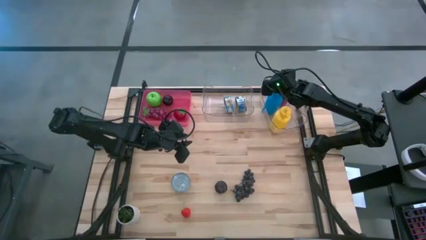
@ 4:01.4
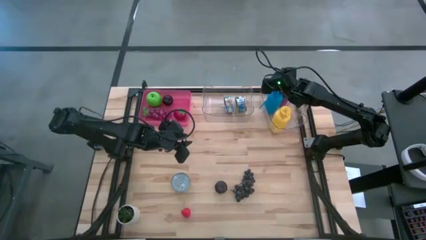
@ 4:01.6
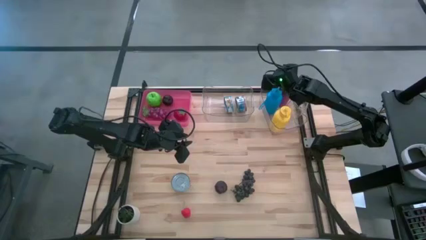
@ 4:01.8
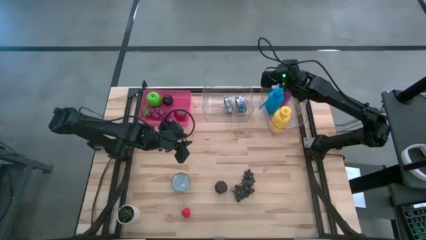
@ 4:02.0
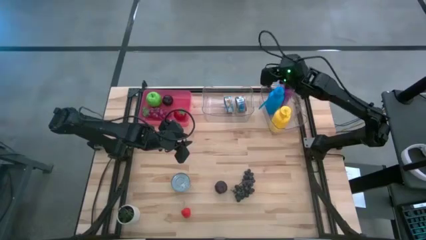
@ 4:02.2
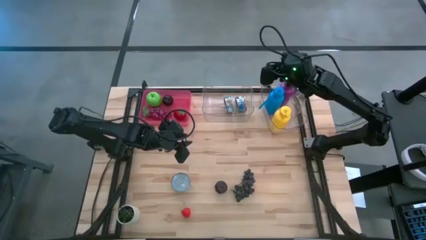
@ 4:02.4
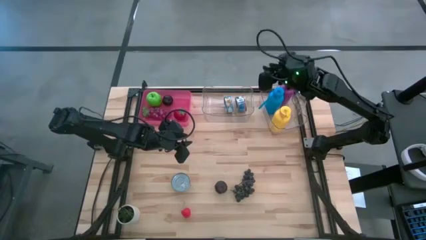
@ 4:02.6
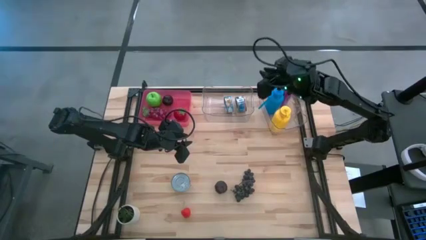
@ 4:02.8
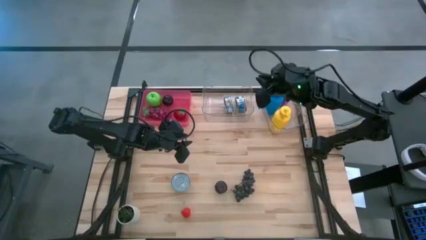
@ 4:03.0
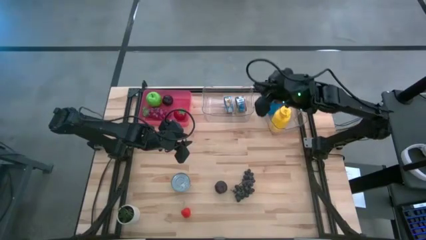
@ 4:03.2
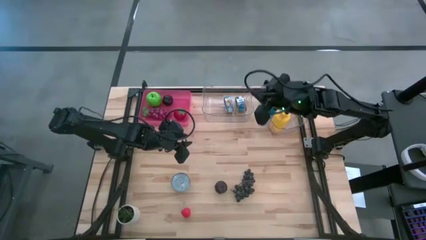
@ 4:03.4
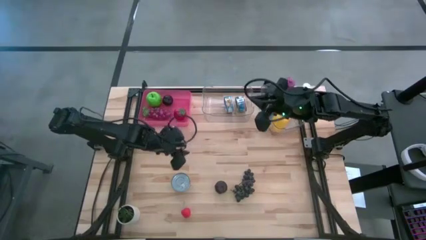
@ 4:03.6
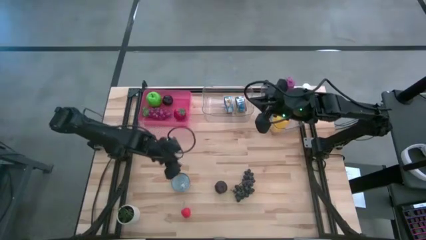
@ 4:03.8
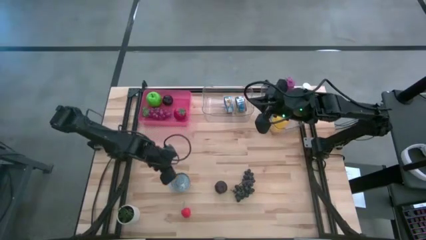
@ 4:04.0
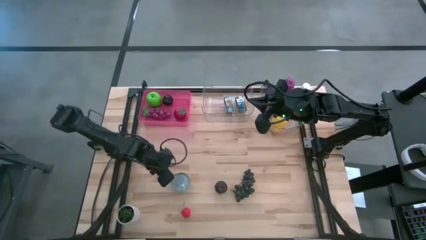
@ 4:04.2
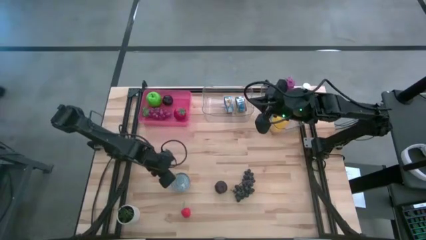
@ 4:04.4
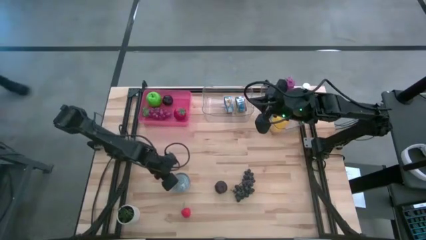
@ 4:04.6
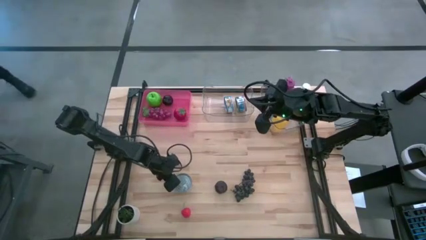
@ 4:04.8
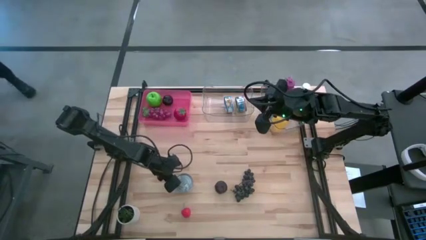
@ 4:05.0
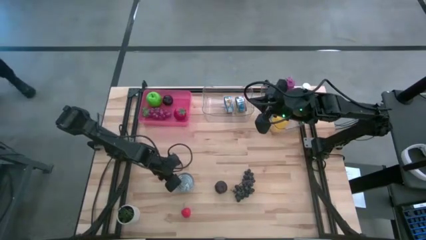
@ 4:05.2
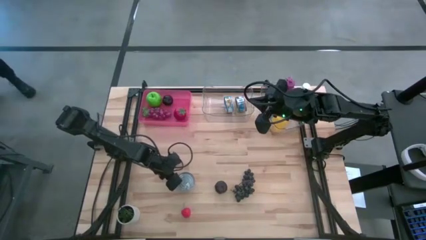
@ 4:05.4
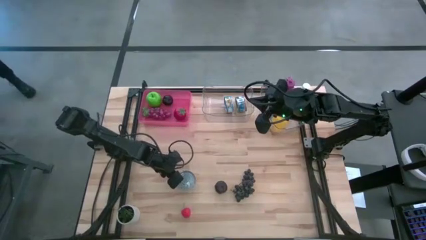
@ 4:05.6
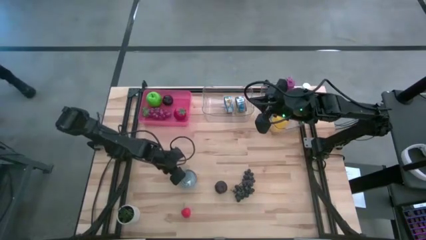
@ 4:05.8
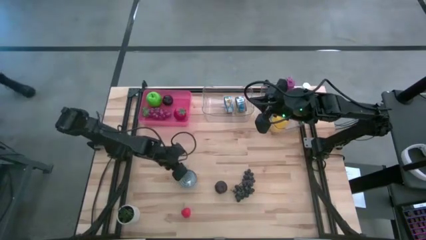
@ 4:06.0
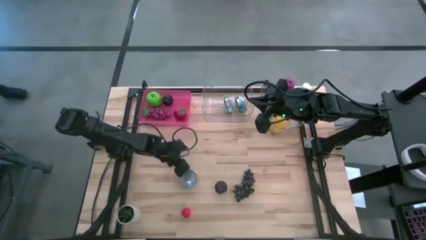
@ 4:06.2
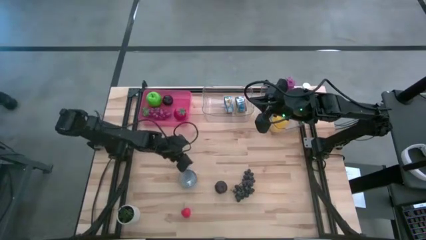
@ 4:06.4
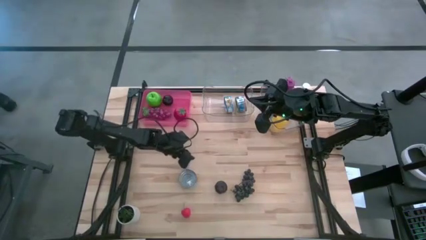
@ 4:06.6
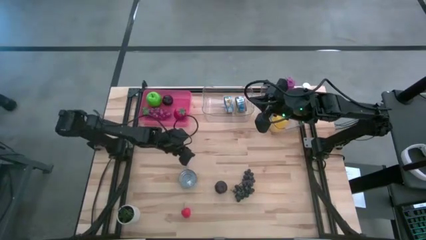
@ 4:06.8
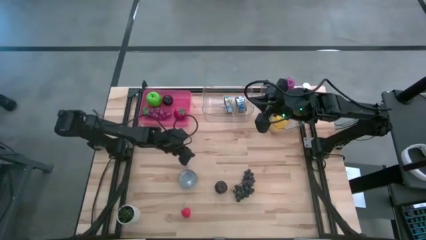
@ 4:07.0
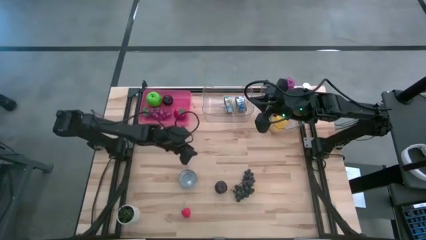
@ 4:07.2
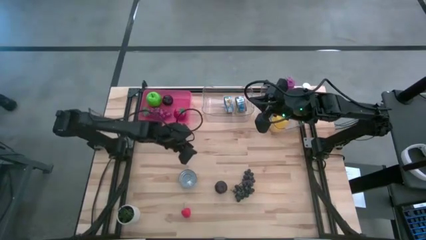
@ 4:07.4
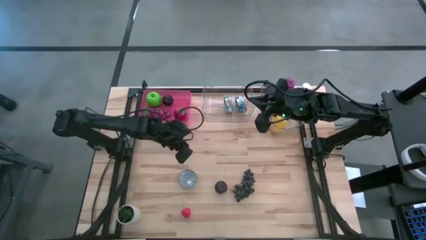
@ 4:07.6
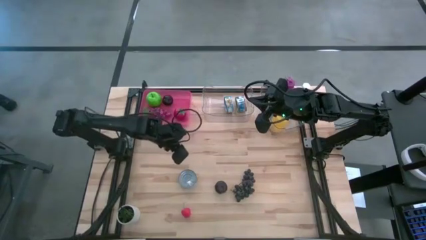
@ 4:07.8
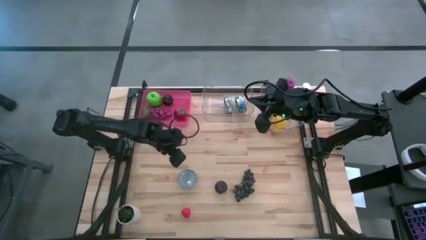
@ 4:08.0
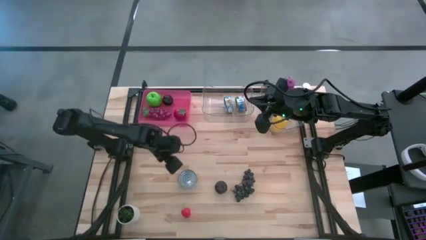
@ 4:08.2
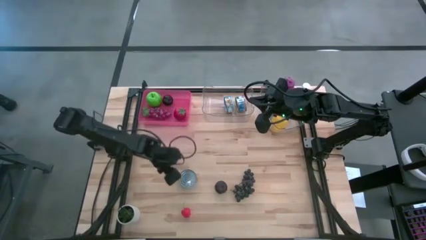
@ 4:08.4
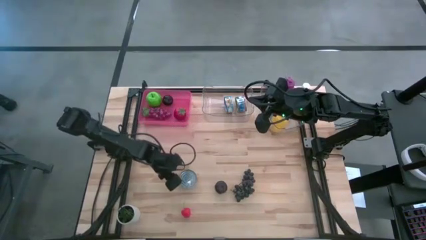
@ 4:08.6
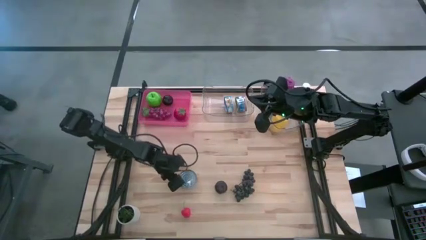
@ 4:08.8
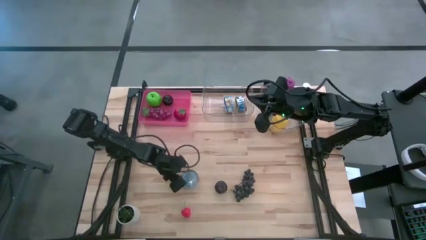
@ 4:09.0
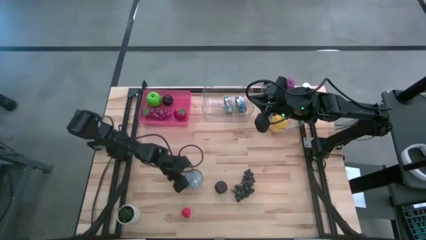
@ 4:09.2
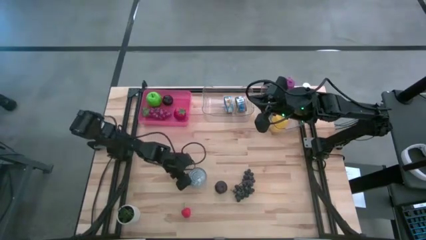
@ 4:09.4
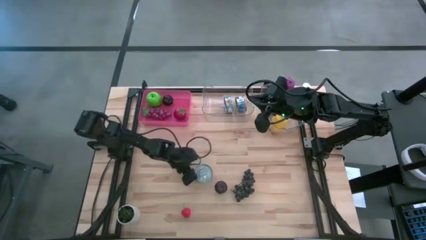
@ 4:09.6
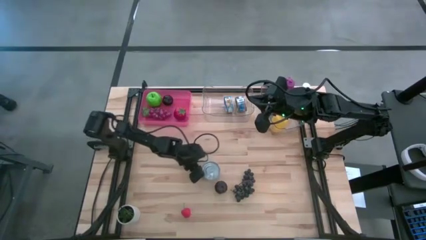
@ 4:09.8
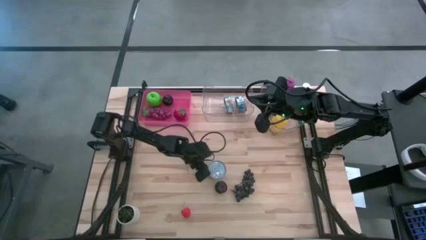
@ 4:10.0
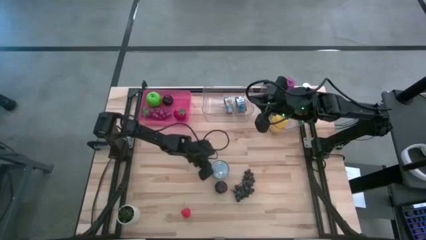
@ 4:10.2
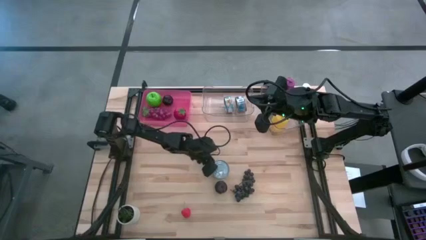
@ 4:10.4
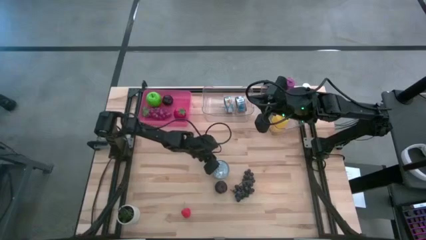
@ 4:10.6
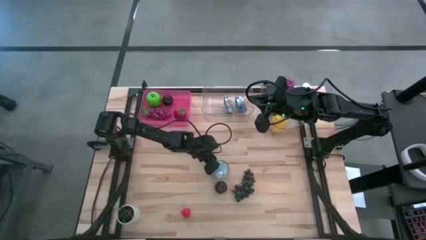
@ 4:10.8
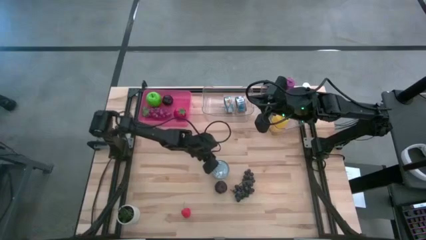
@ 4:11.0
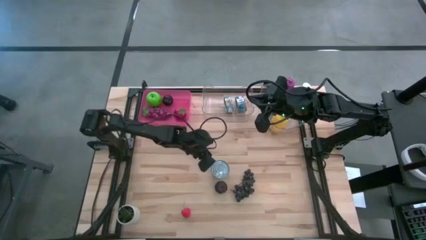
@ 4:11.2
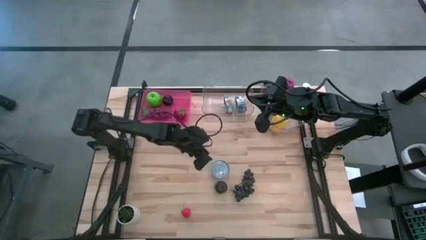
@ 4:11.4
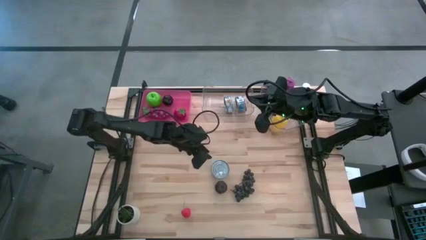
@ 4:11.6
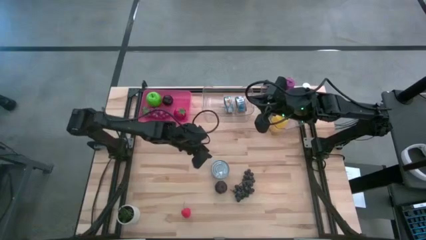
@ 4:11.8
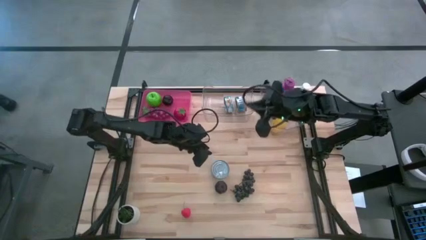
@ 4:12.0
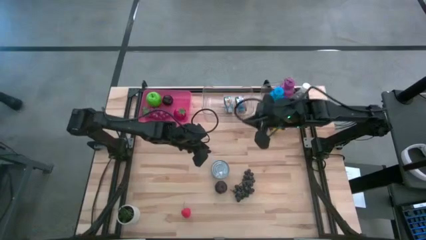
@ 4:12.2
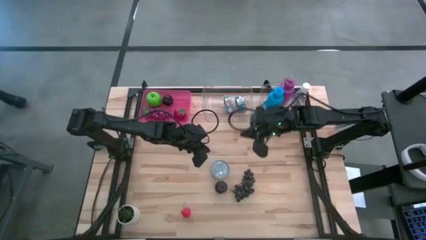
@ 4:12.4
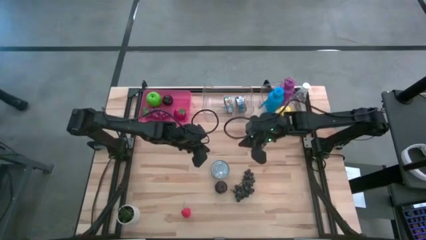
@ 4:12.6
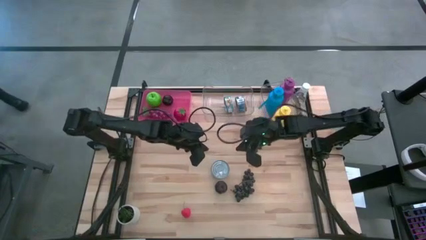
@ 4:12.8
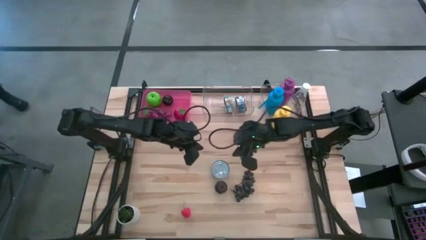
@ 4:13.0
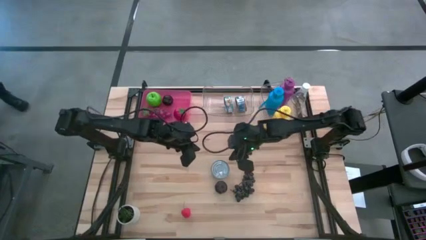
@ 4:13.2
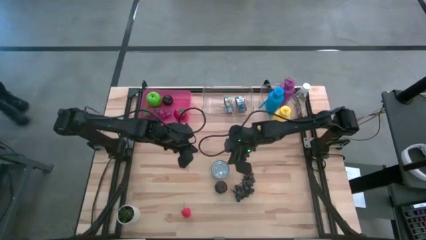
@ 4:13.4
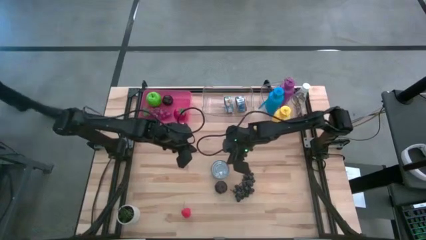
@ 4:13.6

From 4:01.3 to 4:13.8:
Task: Pick & Place Food Item
Put the blue tuna can into the left transparent bin

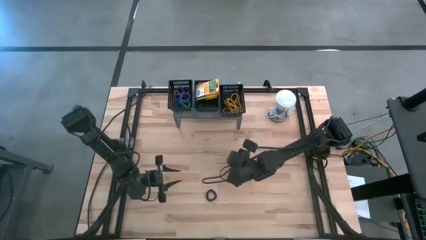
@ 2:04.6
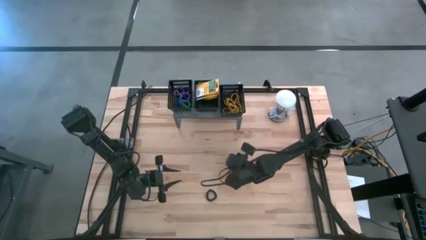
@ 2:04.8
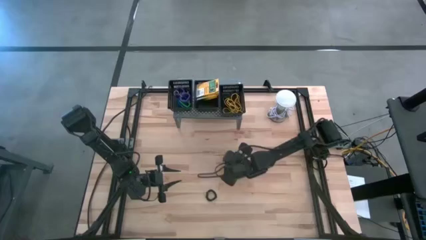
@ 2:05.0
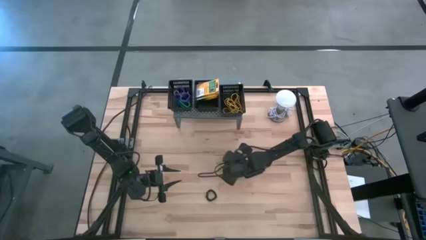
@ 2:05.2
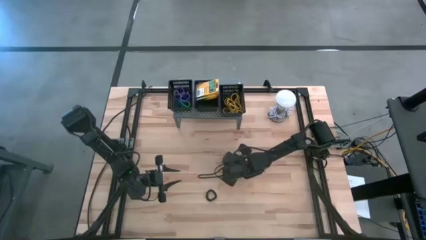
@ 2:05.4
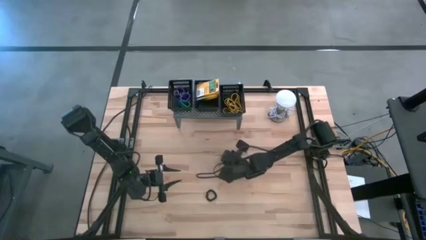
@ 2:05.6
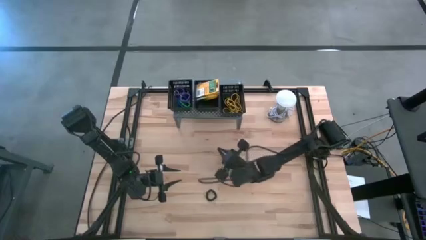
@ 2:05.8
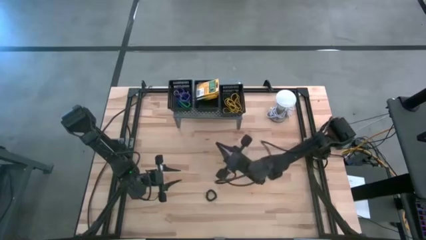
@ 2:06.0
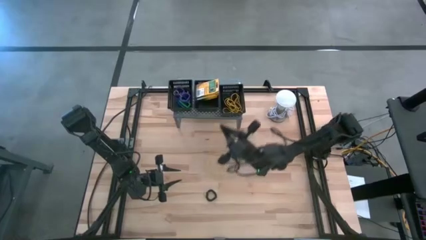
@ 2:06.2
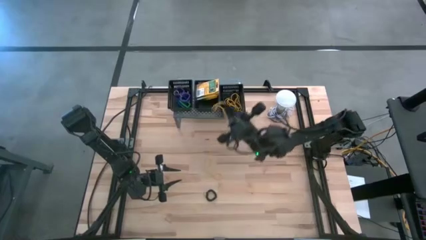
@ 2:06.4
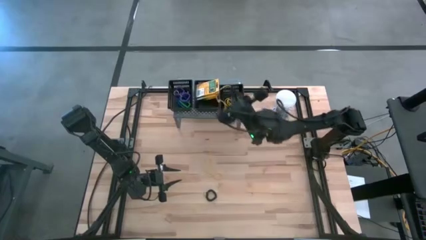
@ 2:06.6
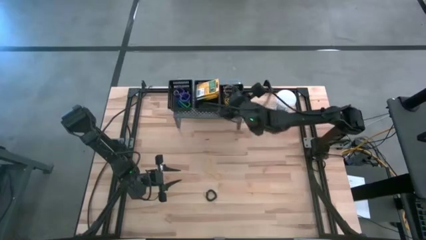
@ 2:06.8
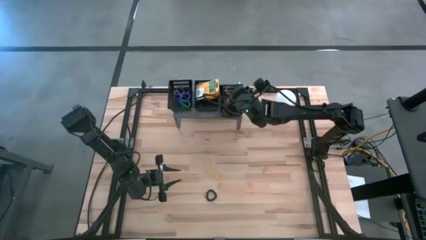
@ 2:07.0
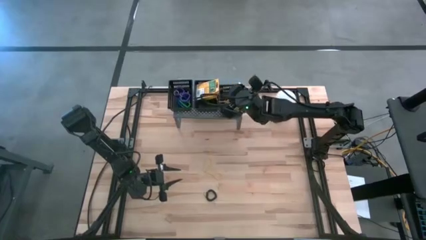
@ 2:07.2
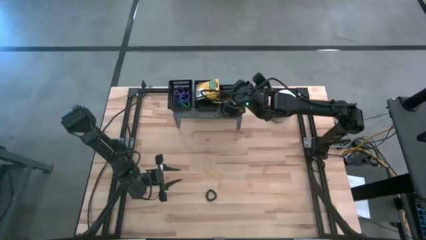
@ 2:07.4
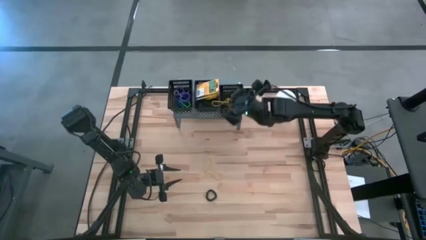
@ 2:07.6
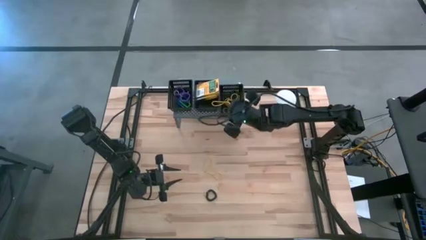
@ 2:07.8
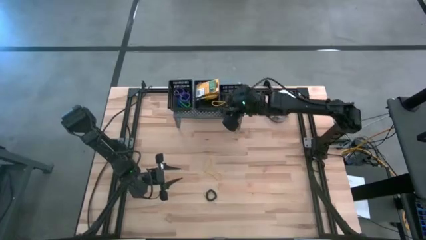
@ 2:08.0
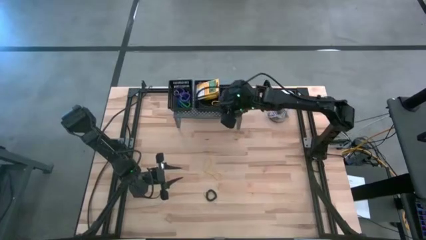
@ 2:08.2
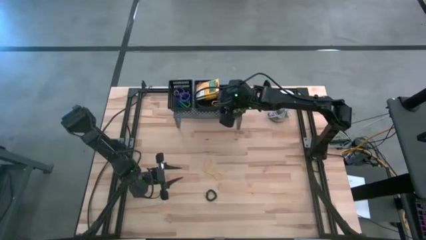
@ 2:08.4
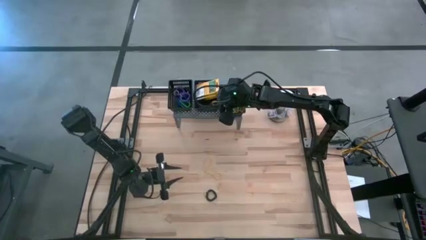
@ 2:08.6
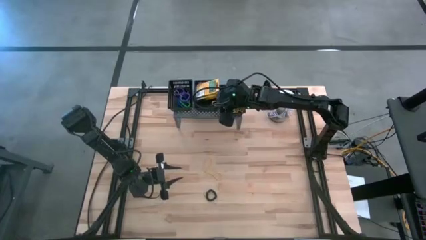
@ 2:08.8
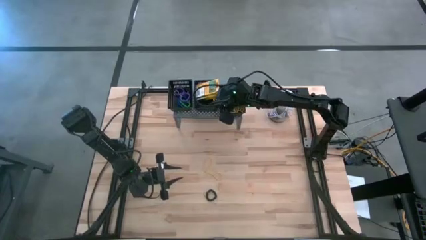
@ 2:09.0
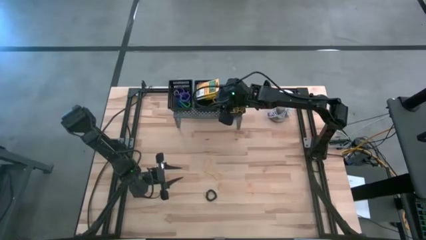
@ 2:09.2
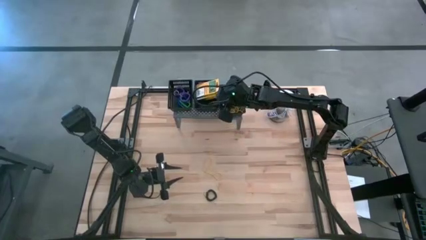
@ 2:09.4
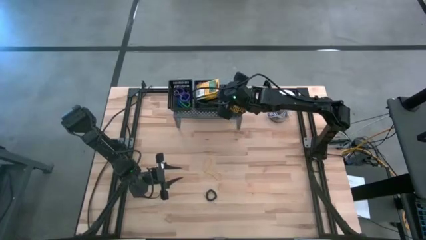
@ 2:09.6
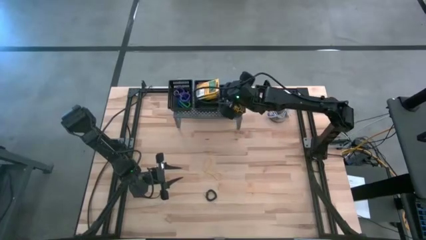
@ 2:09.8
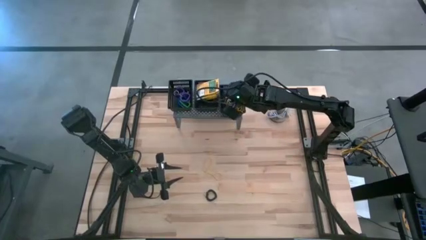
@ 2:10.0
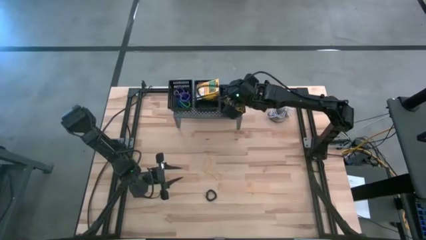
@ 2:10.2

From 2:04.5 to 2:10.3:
Task: Pick & Place Office Desk Supplies
Put the yellow rubber band into the right black bin on the shelf
